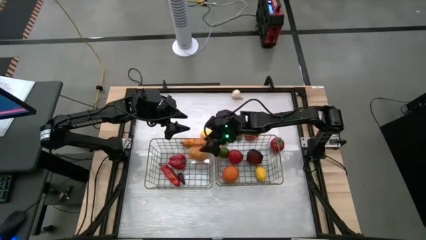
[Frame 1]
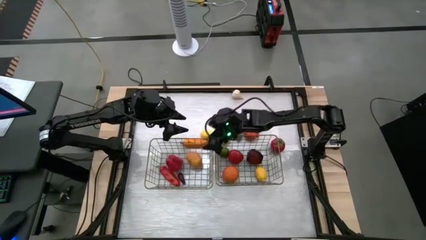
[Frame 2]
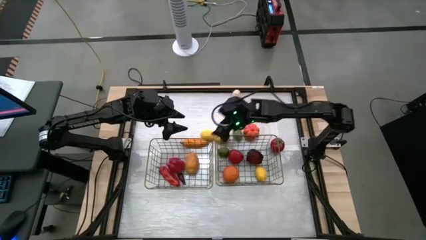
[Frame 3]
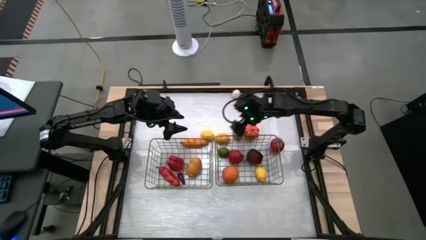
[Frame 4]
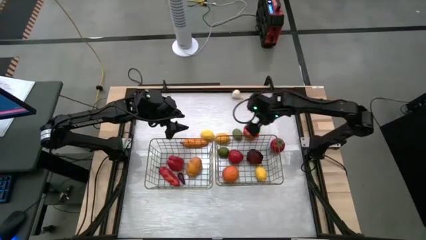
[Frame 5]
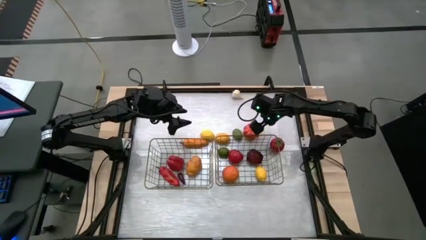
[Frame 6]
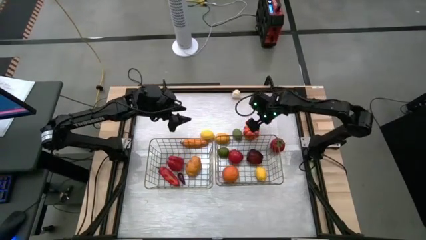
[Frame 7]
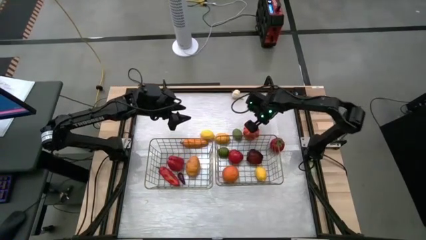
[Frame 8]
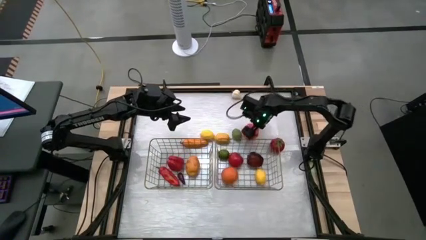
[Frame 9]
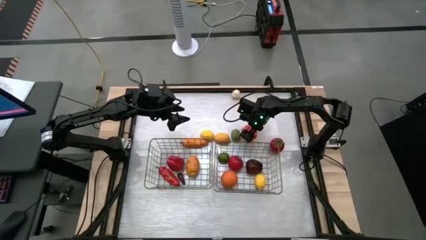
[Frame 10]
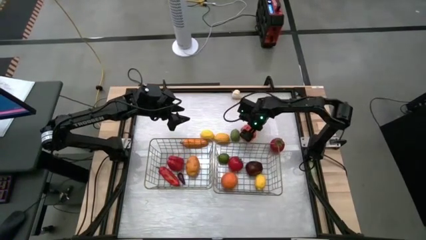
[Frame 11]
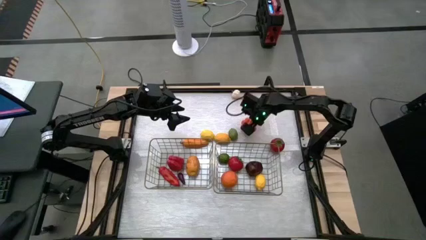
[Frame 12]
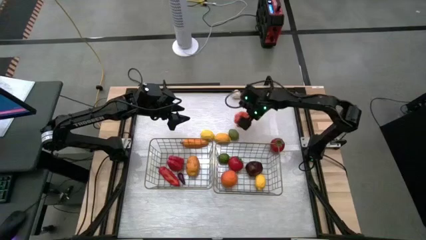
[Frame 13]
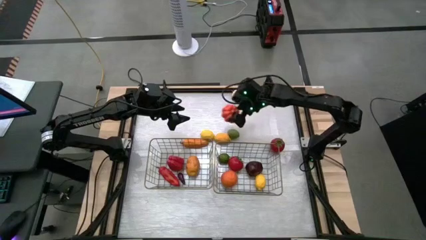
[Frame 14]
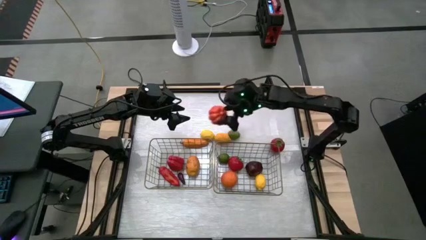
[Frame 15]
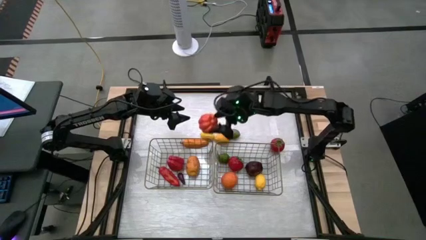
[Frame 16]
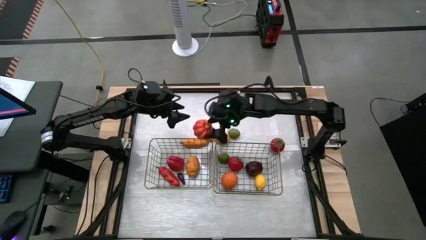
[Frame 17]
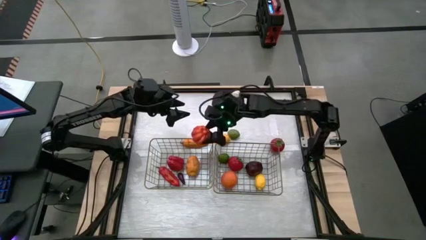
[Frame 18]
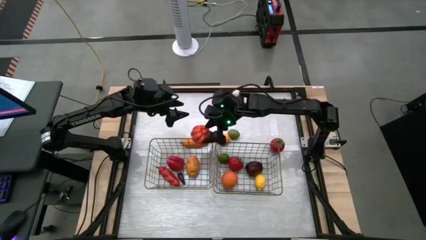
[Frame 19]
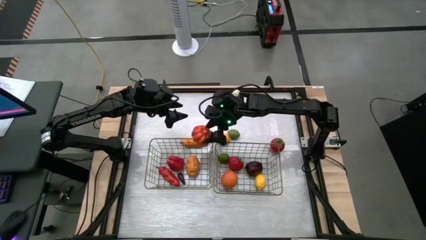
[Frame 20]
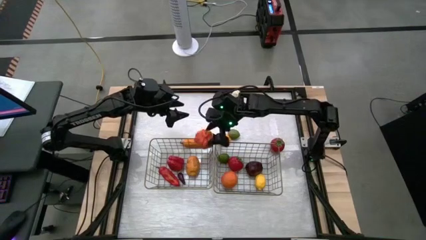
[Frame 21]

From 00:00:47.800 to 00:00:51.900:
Task: Sort produce into baskets
Put the pumpkin into the left wire basket

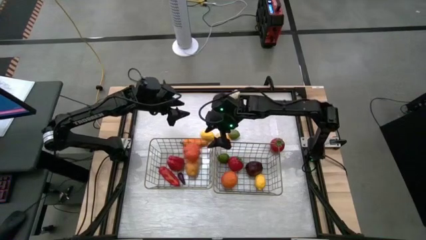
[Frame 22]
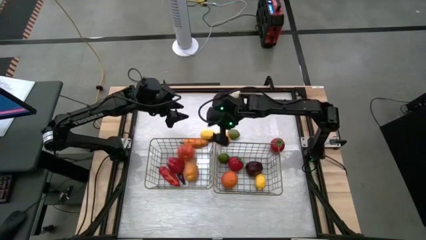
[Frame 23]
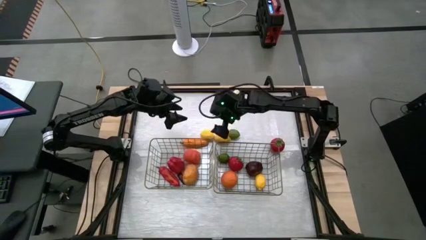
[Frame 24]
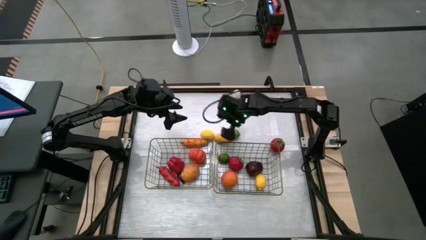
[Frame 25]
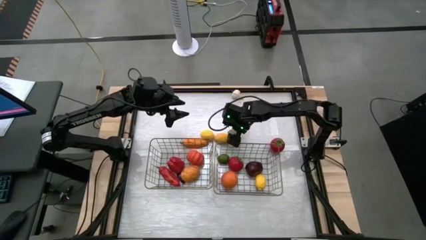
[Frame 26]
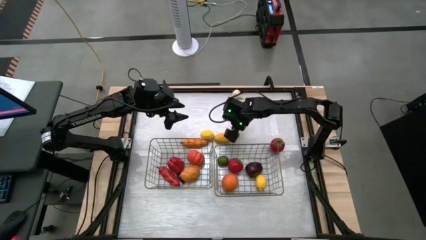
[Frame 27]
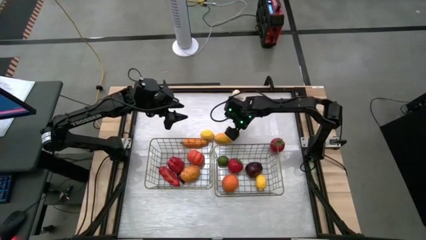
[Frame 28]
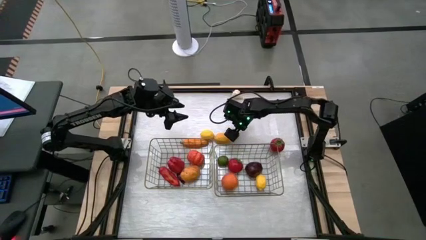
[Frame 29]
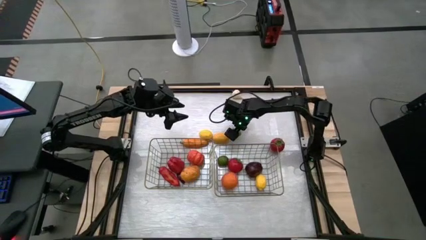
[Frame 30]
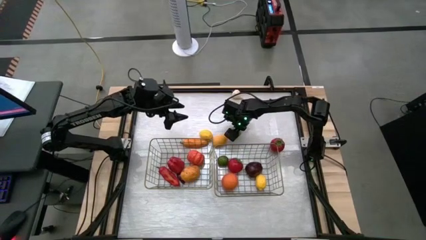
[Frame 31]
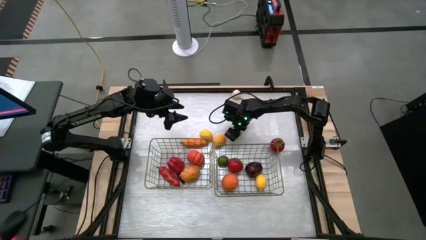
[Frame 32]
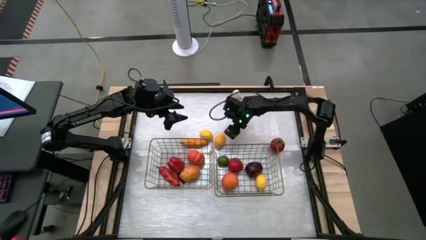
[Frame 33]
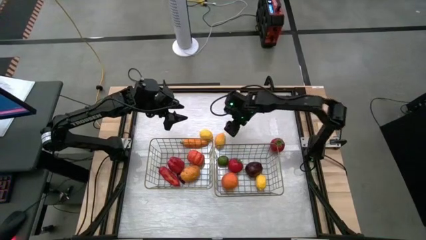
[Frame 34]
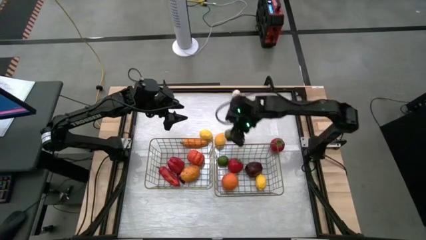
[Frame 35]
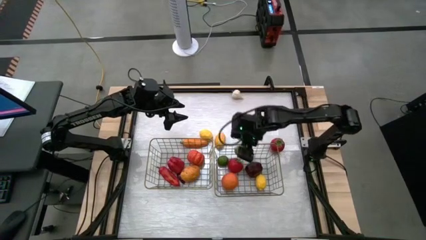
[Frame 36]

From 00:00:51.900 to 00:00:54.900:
Put the lime into the right wire basket

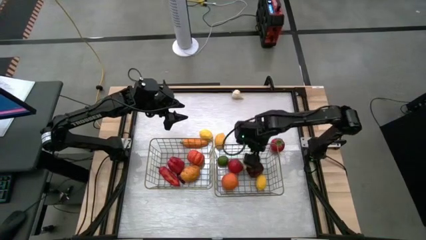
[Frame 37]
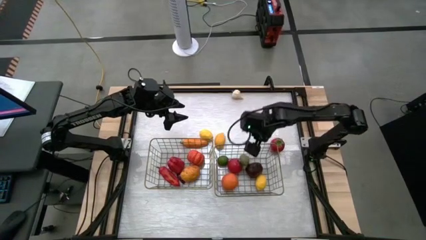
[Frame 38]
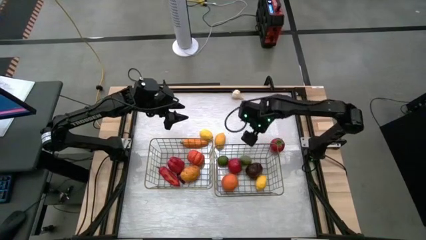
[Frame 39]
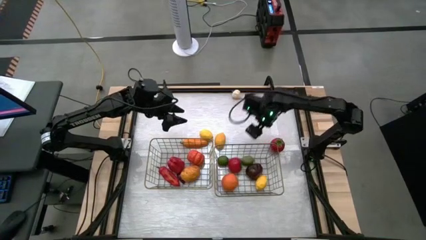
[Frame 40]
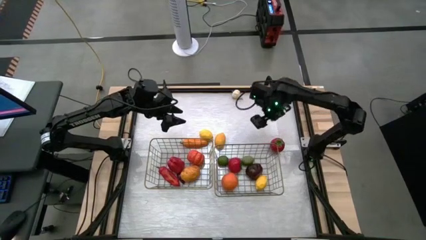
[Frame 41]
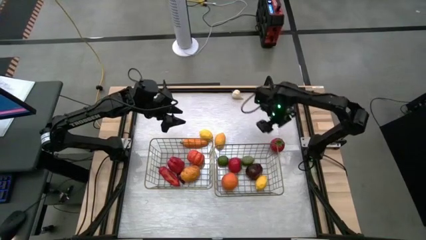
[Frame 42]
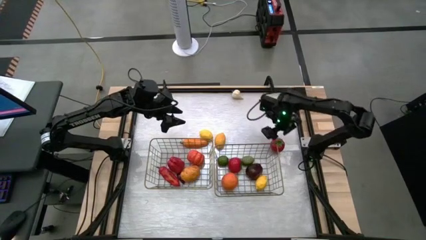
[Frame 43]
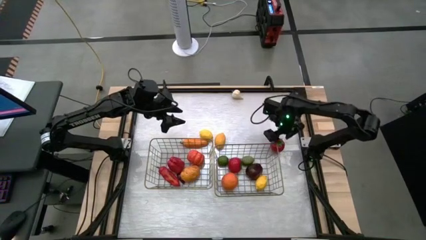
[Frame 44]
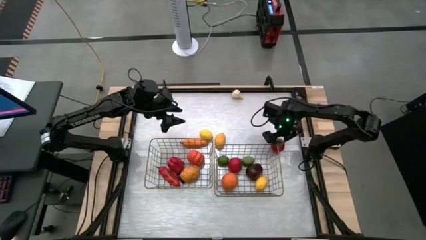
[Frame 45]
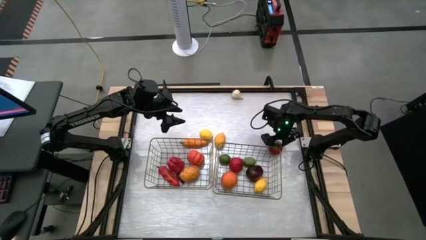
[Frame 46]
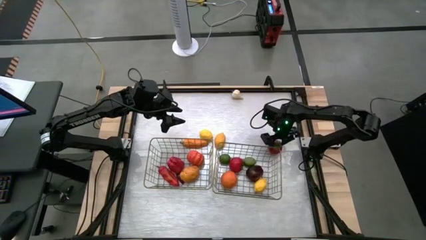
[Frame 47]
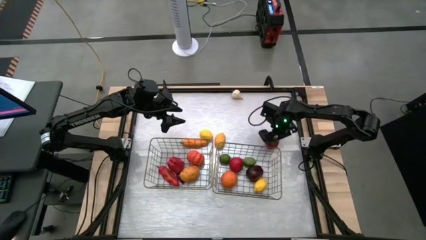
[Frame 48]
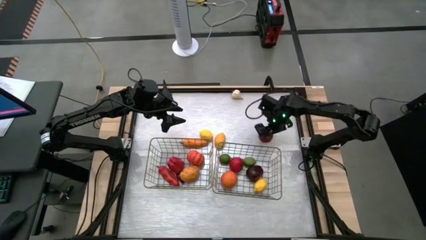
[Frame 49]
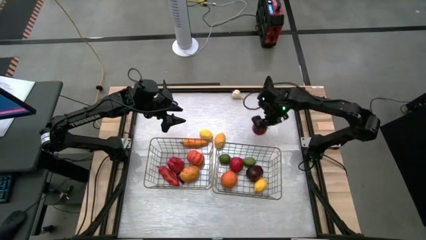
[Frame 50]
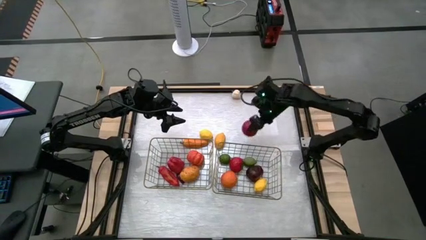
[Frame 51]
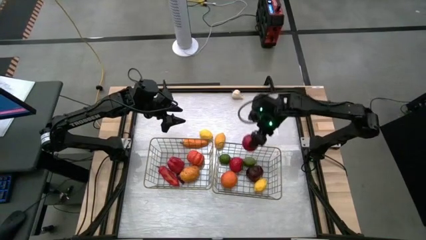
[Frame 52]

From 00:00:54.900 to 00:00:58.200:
Put the tomato into the right wire basket

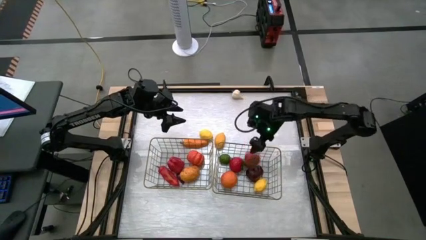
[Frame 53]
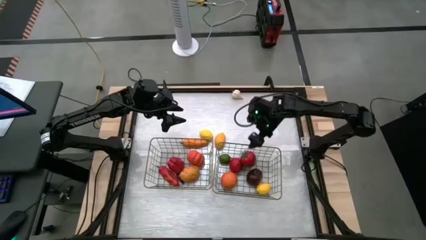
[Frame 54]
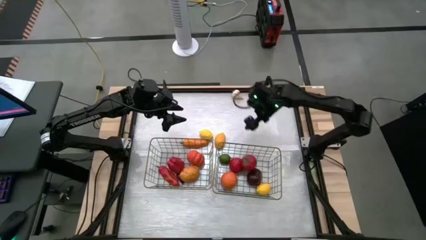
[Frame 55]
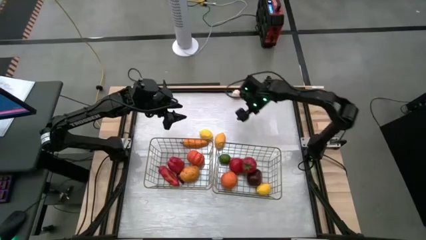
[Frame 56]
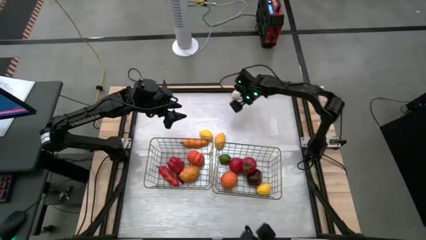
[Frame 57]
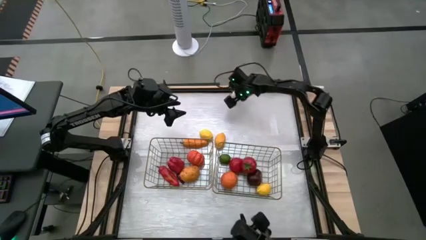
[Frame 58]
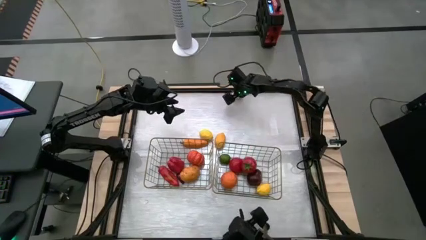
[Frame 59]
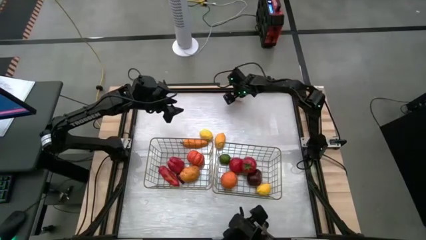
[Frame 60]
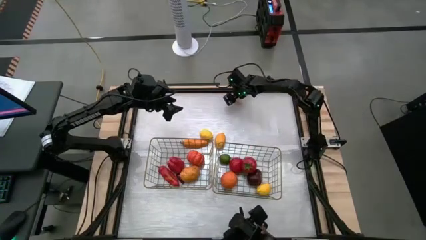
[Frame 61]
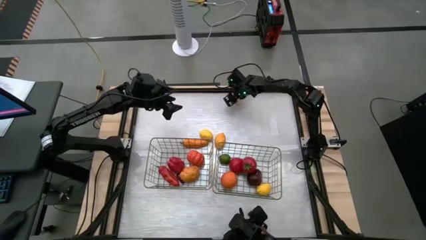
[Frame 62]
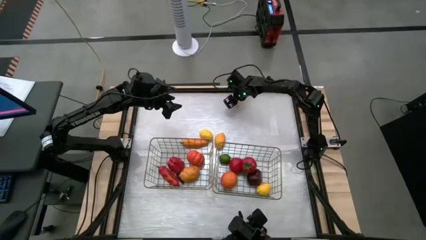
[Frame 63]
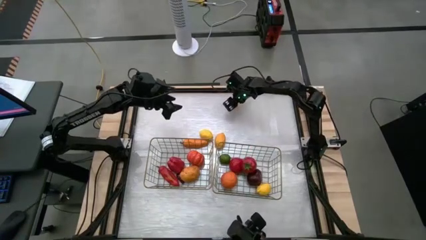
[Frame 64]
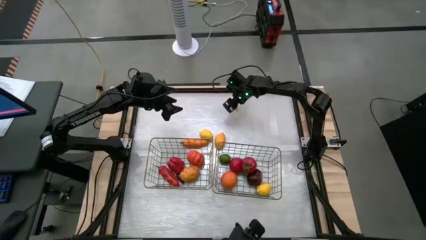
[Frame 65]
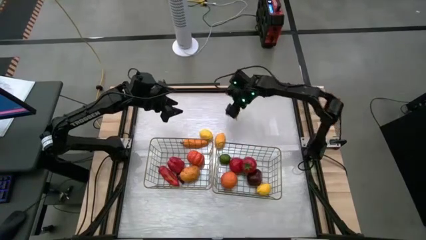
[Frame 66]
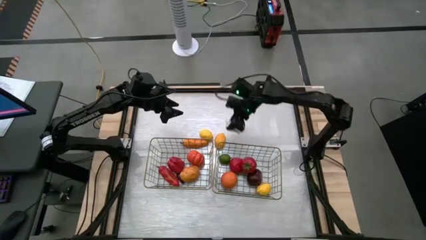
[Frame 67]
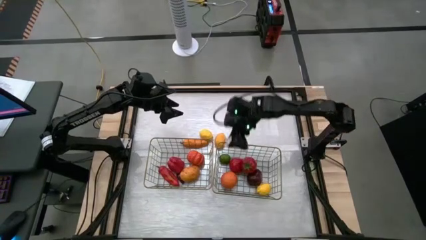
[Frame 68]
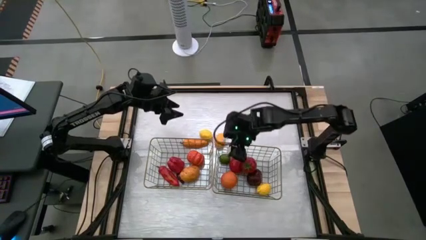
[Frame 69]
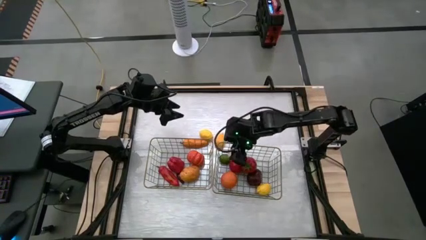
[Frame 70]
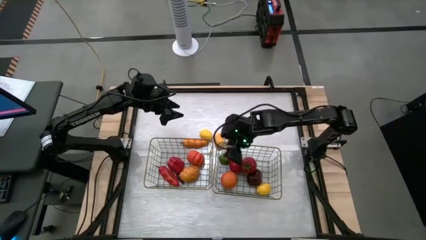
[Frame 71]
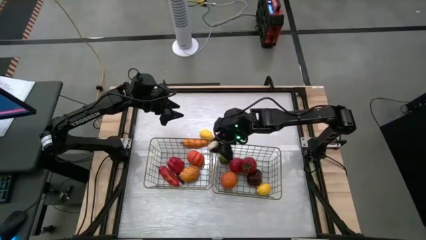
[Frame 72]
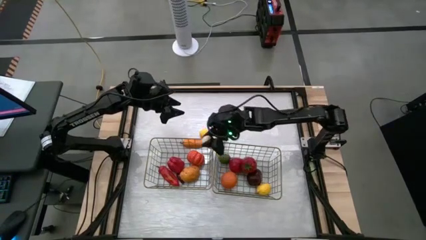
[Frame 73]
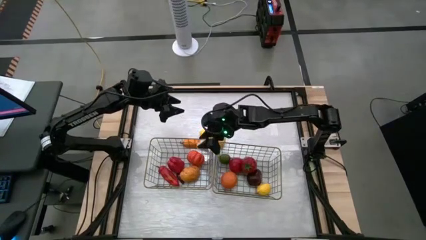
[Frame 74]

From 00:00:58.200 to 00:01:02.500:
Put the garlic into the left wire basket
